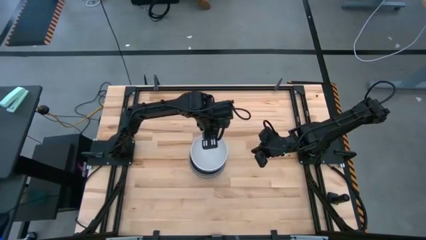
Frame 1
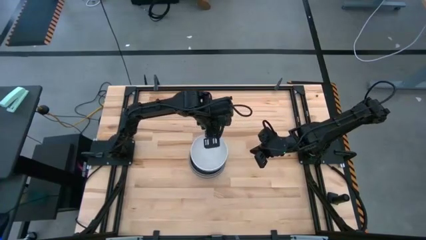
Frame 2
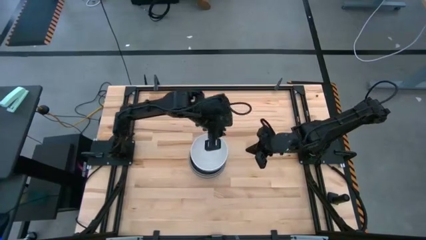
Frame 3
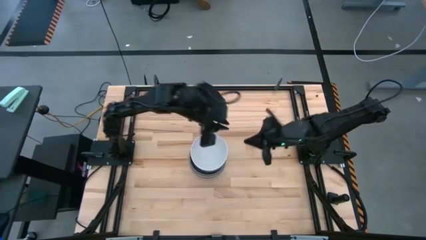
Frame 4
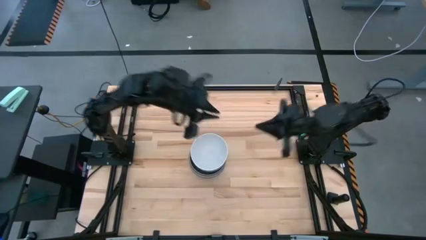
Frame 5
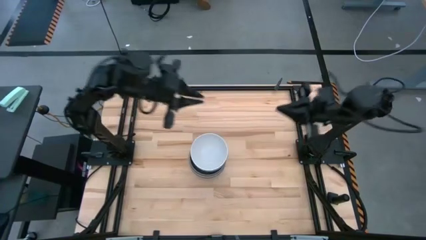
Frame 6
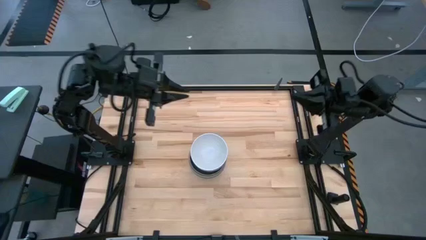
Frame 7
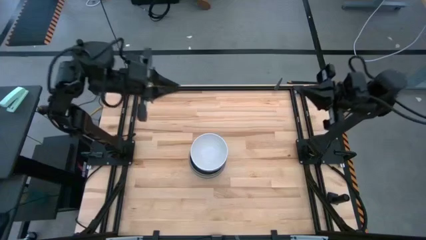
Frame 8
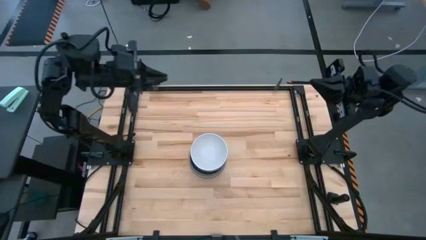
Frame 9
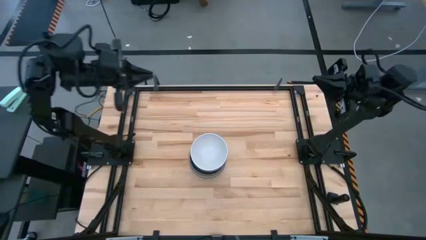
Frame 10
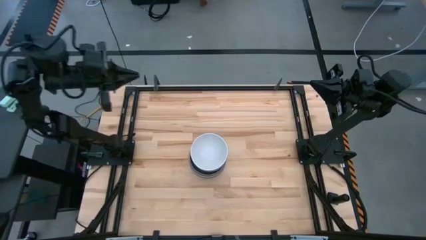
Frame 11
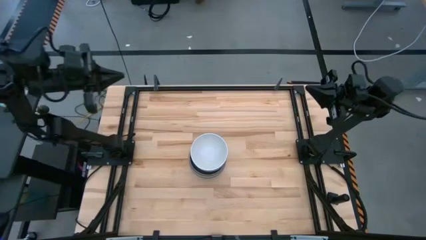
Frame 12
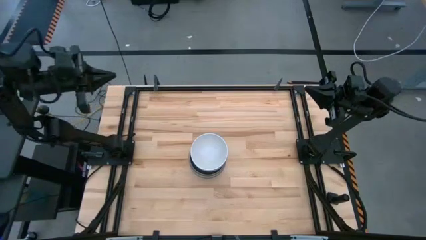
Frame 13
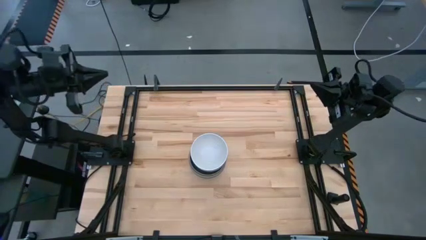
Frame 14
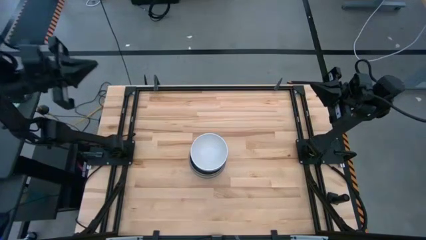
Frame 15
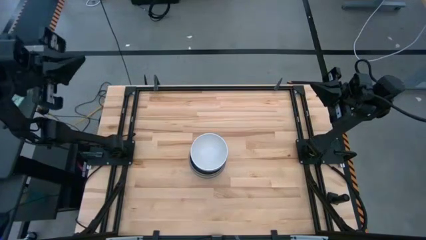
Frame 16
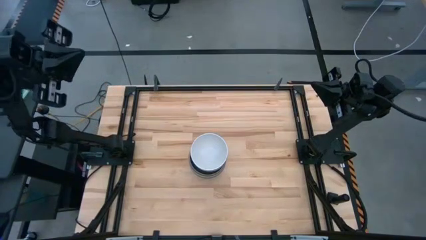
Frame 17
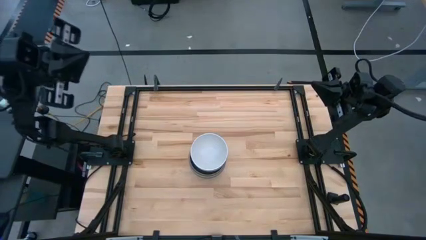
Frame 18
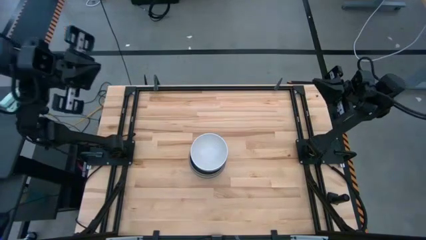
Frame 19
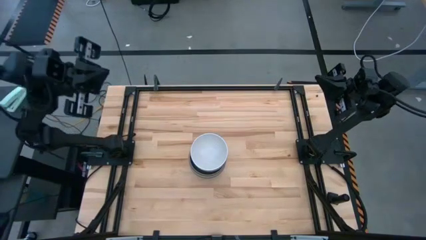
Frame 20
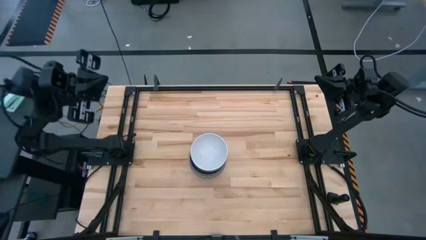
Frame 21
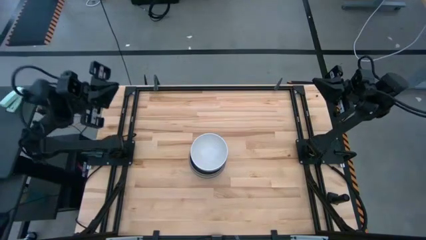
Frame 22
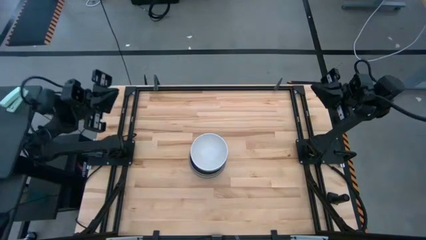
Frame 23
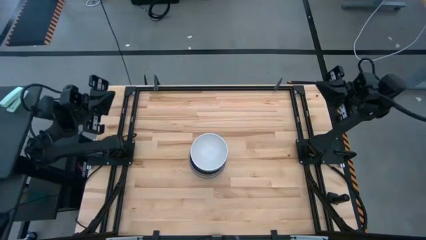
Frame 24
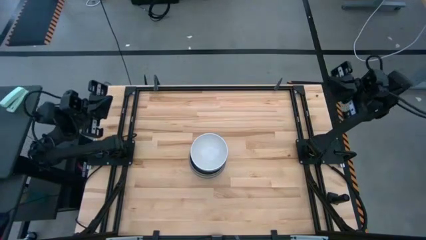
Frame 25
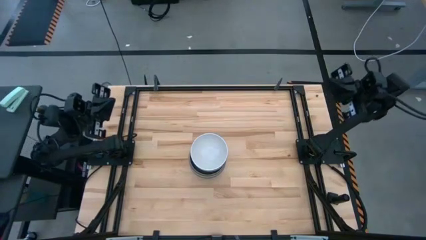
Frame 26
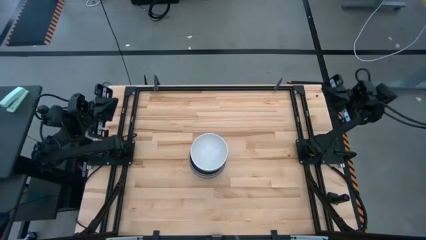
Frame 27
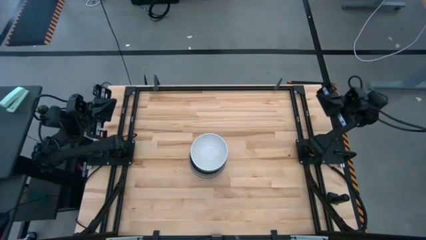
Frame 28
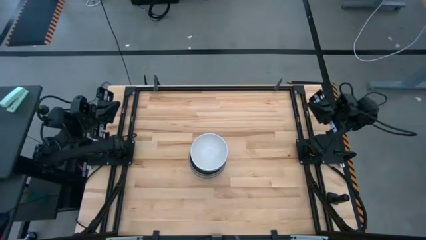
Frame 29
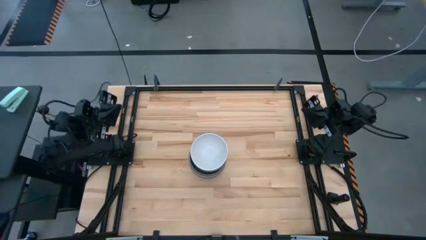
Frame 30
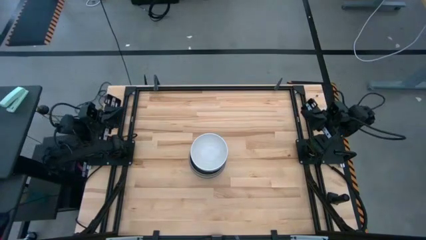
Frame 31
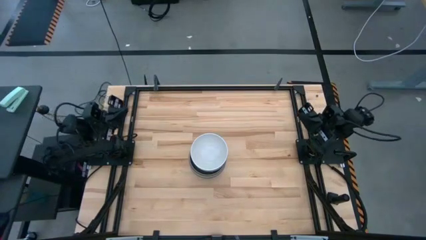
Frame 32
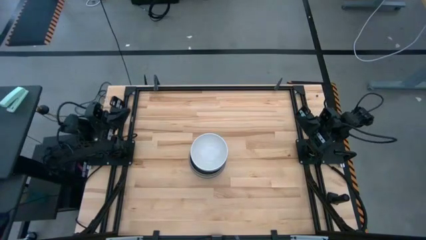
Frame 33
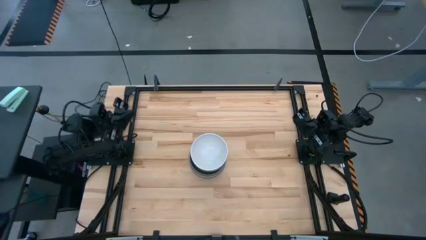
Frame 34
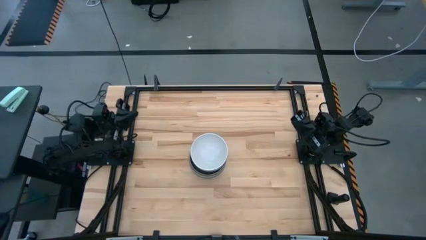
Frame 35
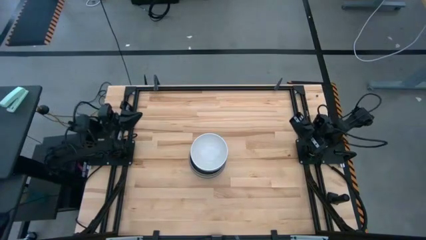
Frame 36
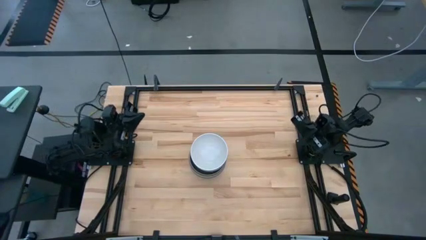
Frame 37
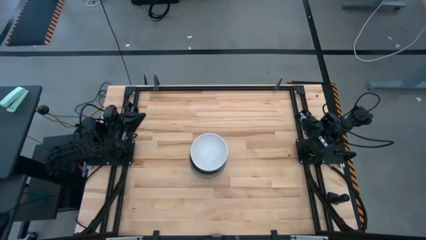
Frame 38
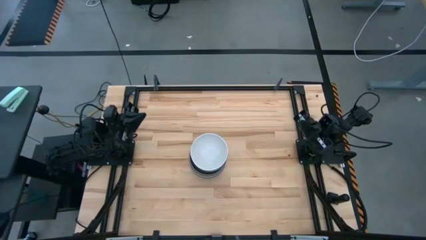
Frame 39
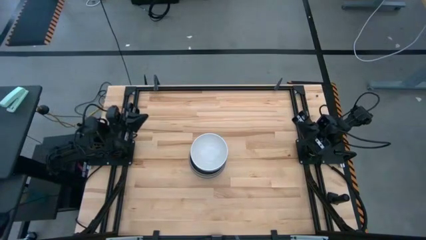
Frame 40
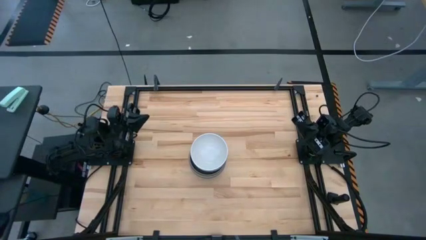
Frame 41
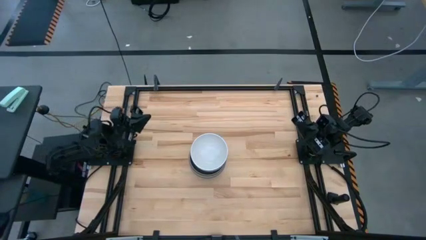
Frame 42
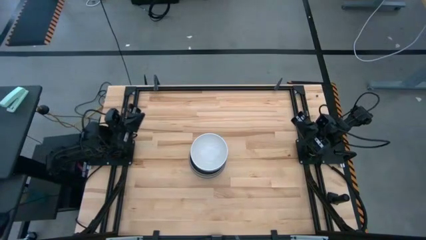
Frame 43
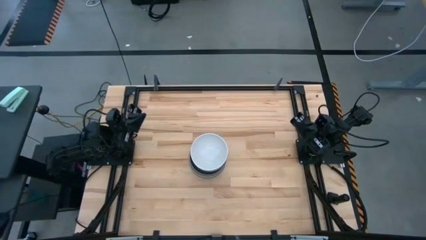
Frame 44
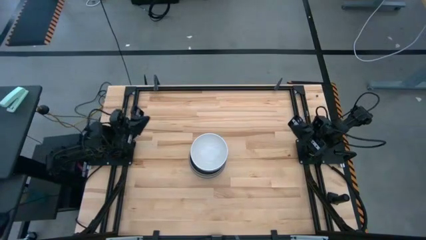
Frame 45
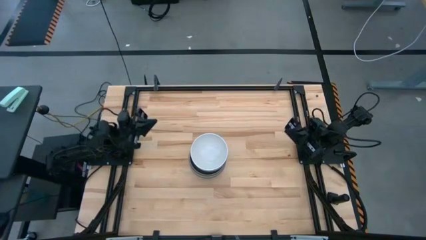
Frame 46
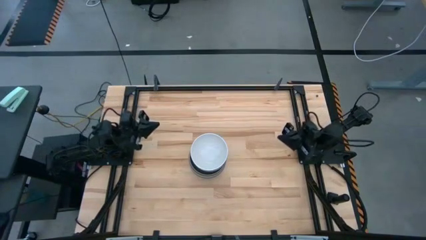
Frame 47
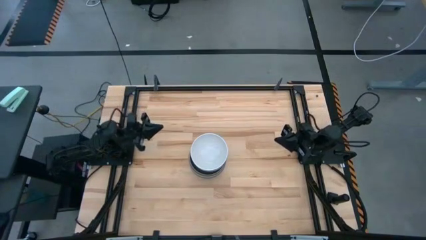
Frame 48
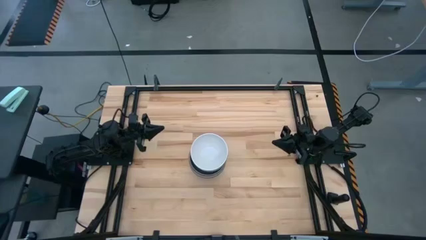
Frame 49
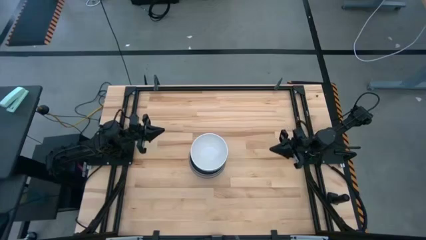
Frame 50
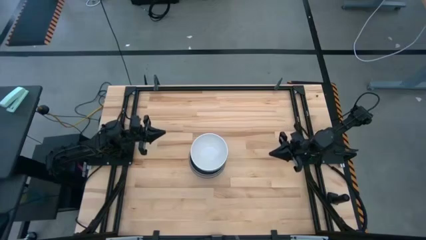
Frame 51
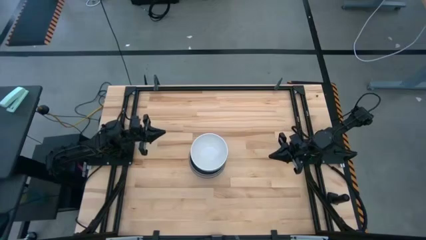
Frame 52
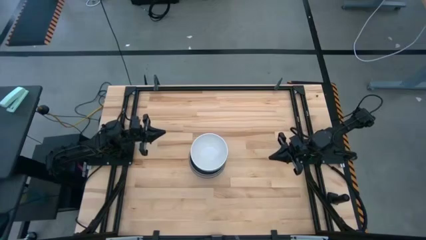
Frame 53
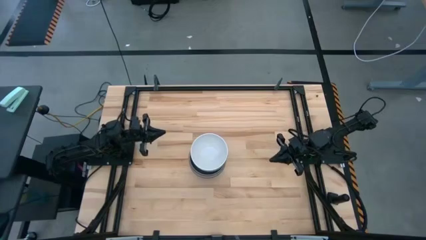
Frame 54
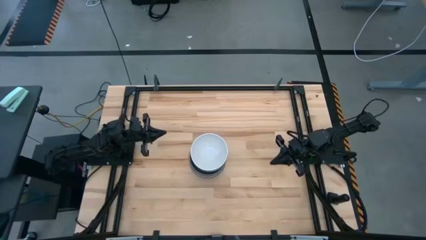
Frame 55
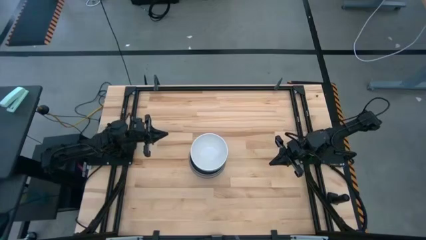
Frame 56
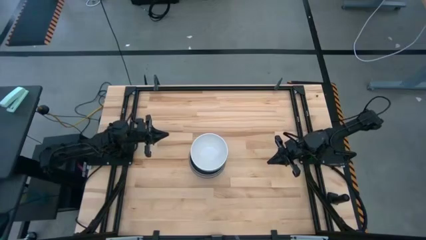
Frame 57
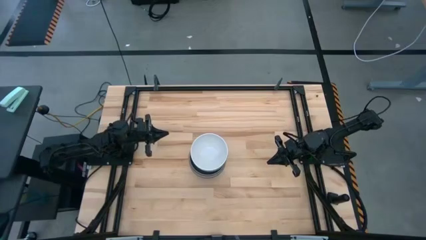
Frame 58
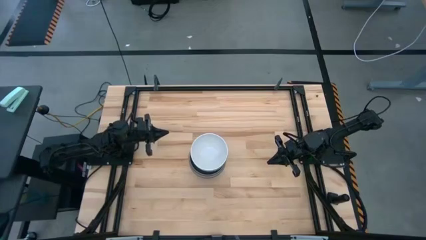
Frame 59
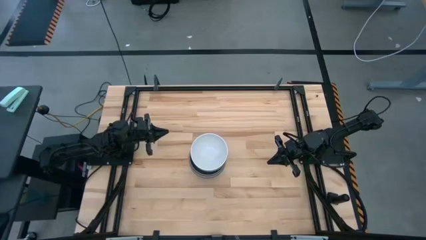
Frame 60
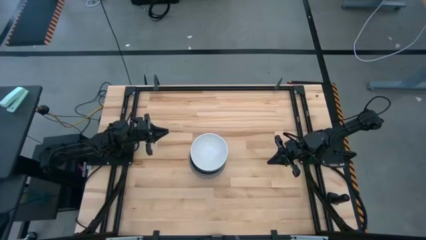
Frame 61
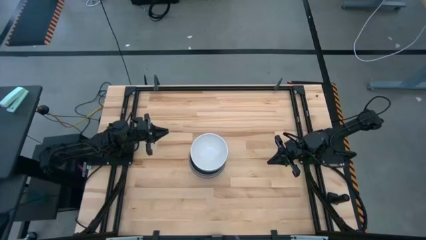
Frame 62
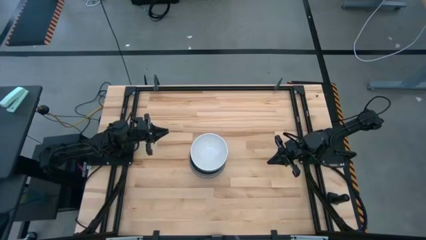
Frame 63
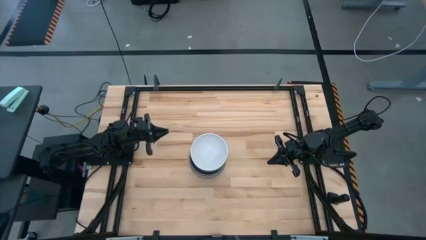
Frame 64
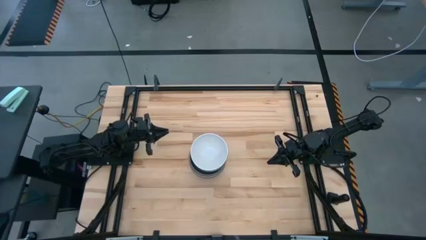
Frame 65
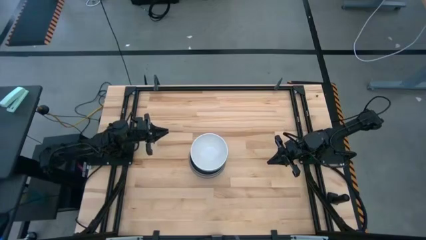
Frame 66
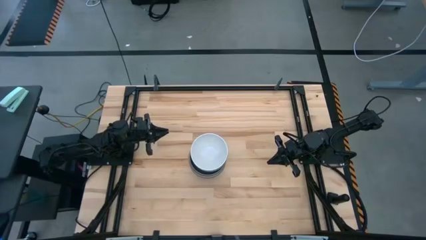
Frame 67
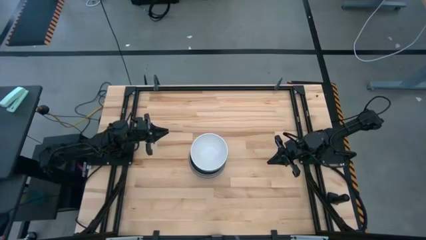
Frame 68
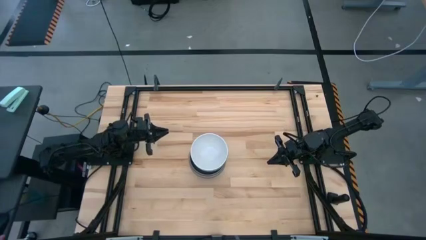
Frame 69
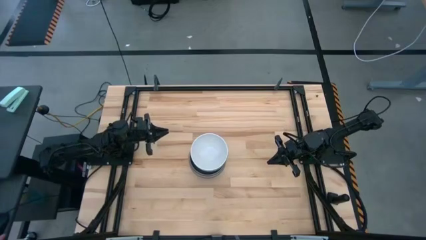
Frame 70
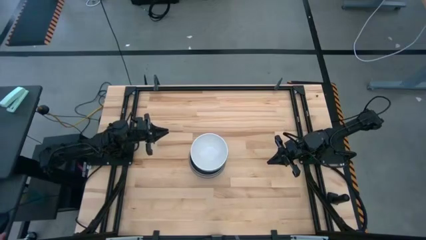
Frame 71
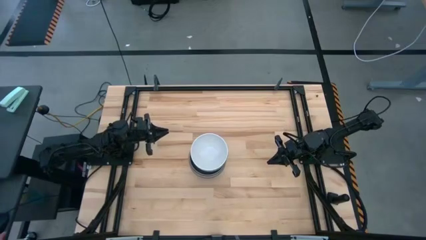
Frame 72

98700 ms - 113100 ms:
Task: Nest bowls inside each other
Return to Home Position
